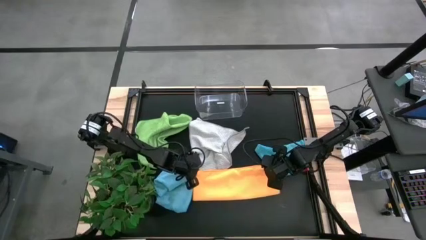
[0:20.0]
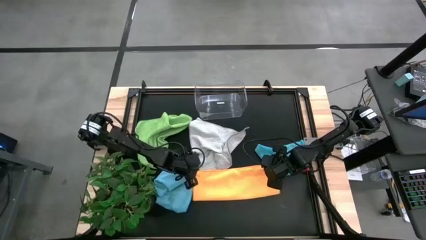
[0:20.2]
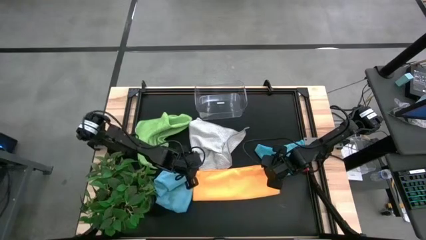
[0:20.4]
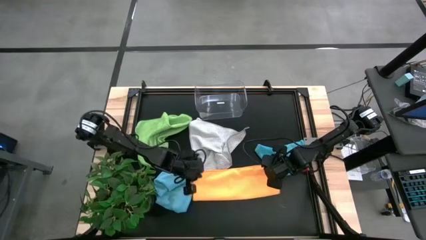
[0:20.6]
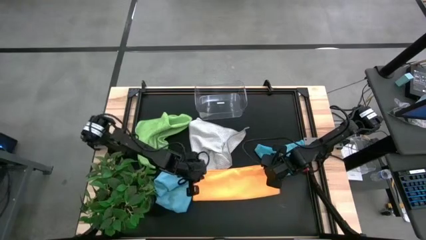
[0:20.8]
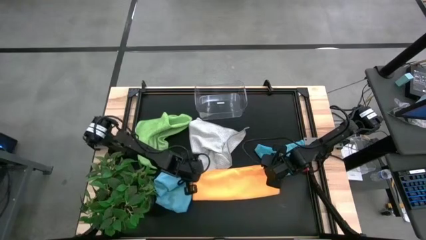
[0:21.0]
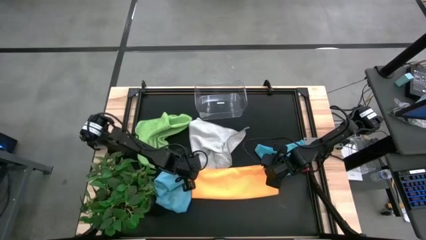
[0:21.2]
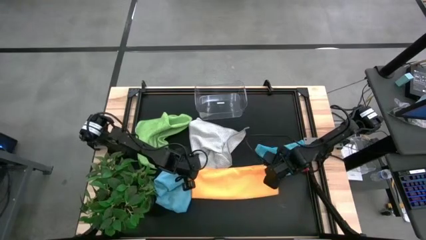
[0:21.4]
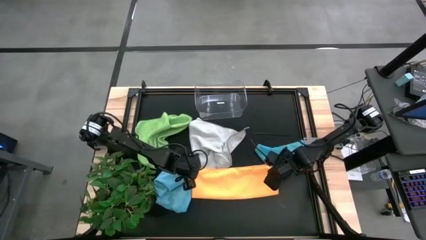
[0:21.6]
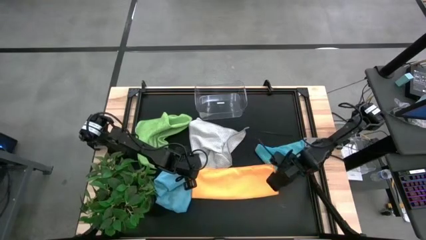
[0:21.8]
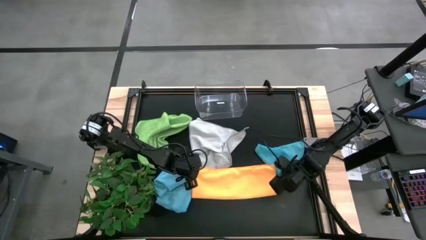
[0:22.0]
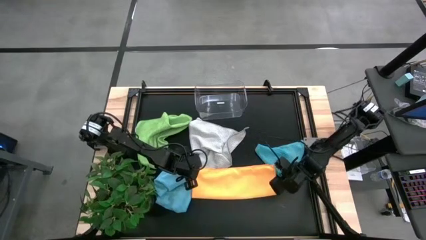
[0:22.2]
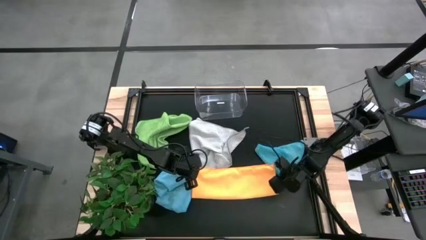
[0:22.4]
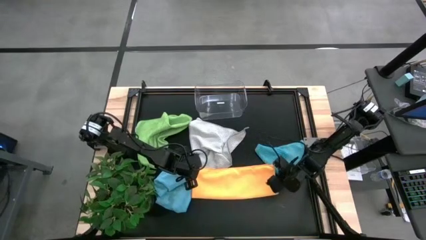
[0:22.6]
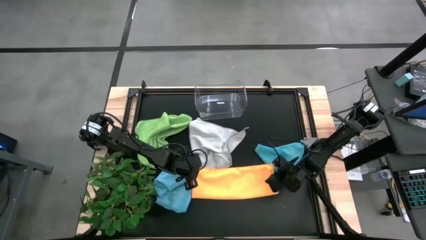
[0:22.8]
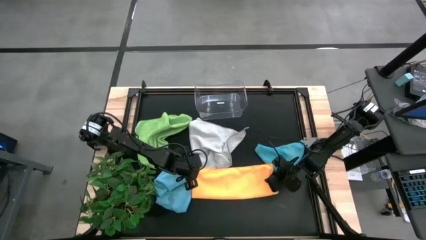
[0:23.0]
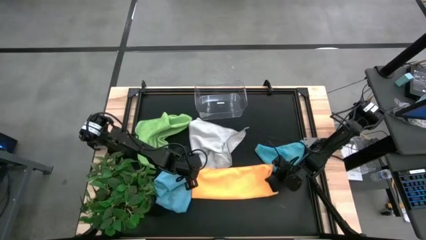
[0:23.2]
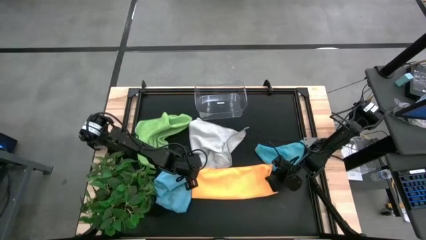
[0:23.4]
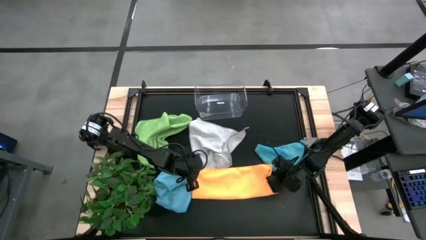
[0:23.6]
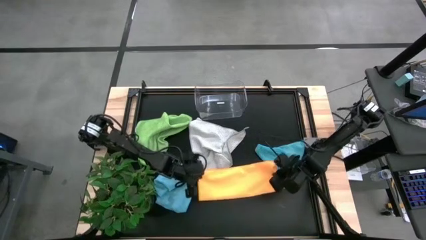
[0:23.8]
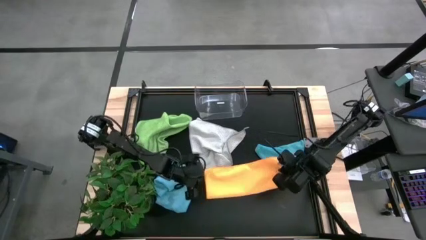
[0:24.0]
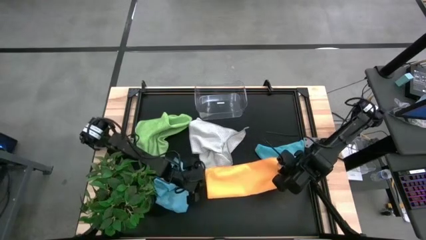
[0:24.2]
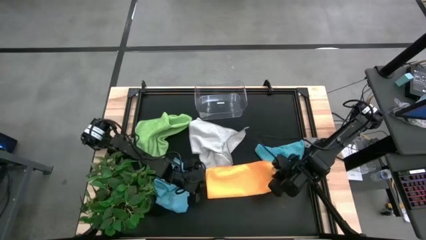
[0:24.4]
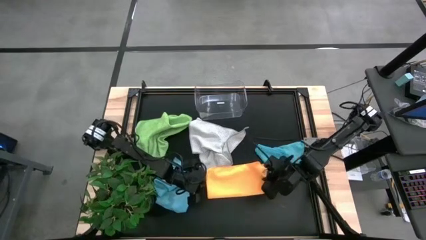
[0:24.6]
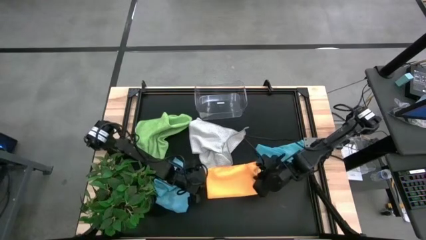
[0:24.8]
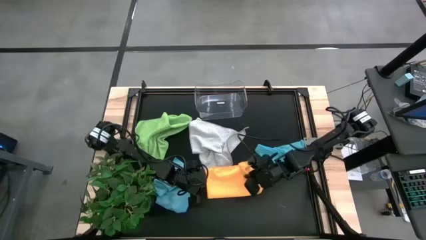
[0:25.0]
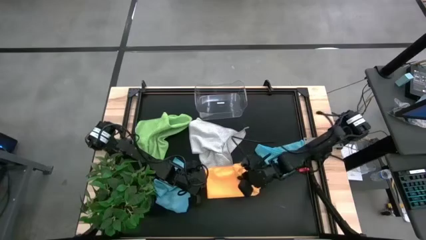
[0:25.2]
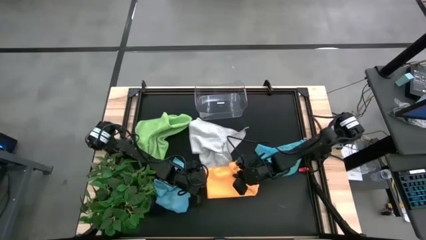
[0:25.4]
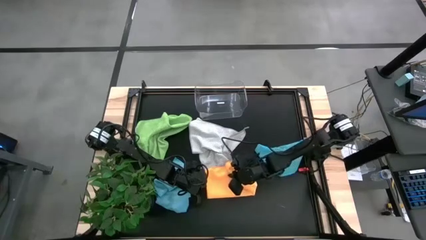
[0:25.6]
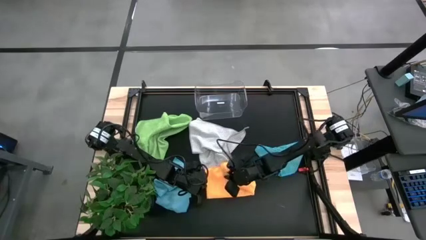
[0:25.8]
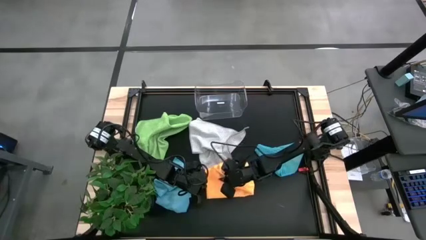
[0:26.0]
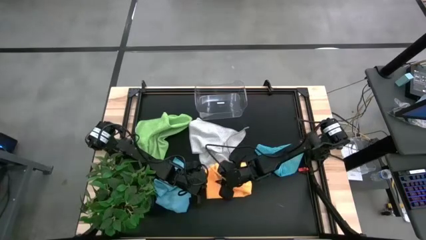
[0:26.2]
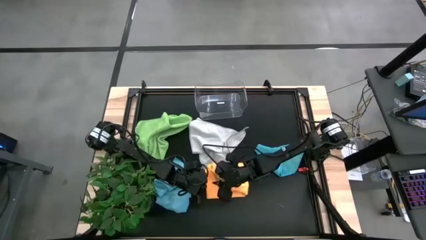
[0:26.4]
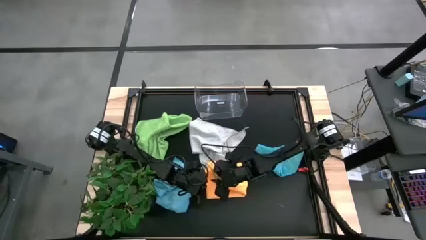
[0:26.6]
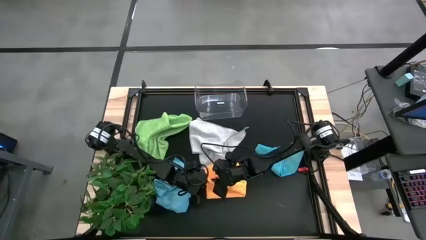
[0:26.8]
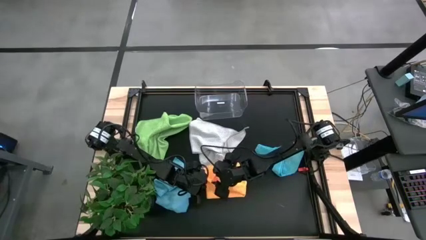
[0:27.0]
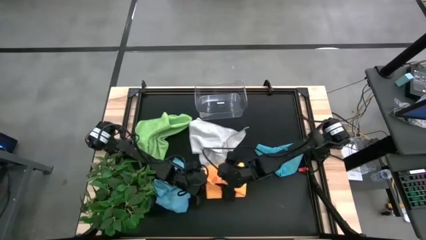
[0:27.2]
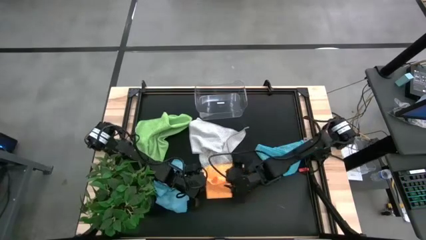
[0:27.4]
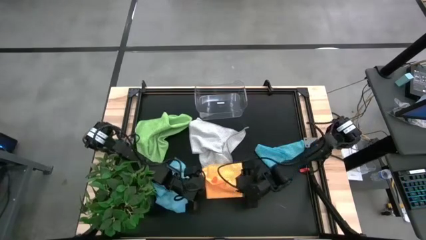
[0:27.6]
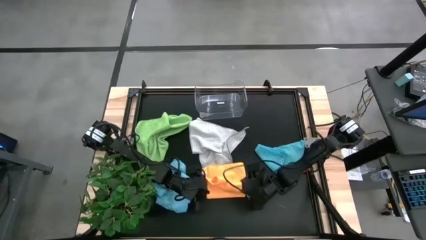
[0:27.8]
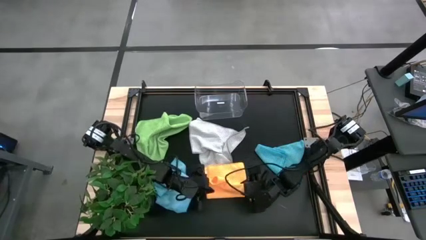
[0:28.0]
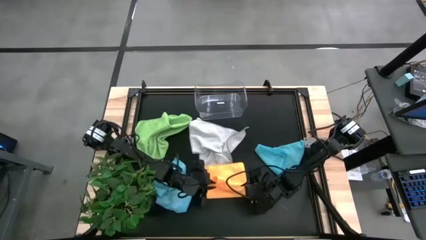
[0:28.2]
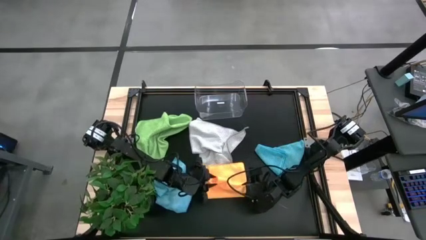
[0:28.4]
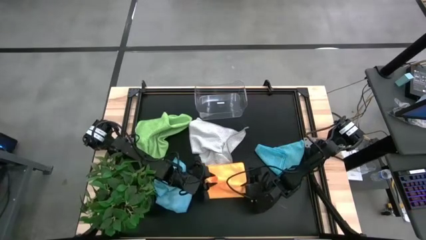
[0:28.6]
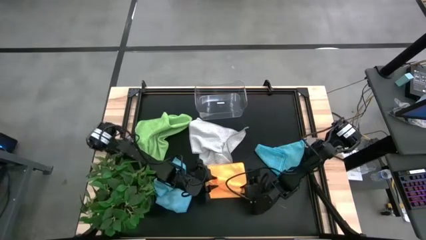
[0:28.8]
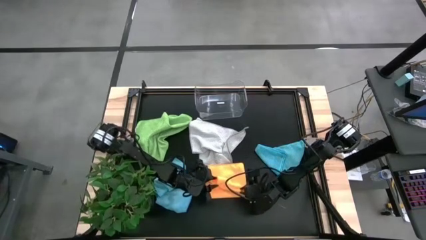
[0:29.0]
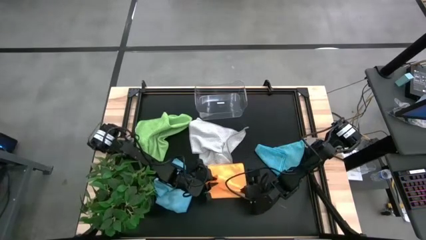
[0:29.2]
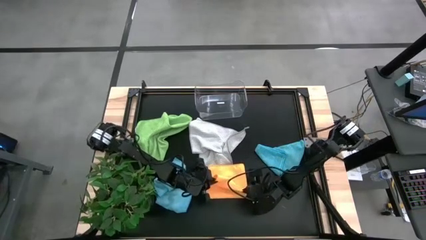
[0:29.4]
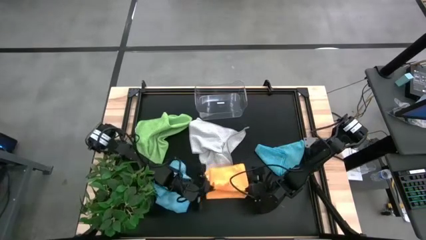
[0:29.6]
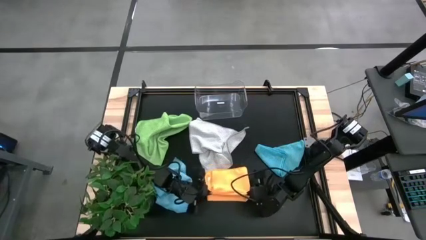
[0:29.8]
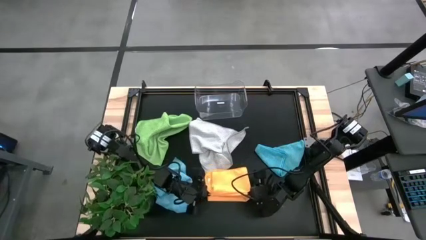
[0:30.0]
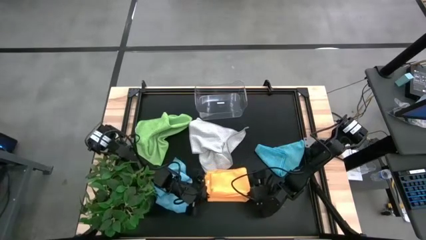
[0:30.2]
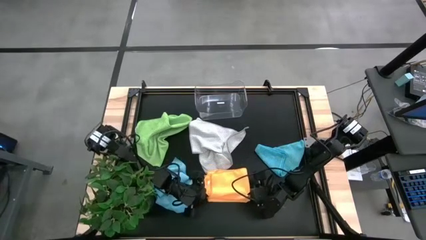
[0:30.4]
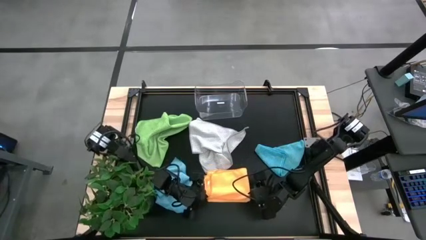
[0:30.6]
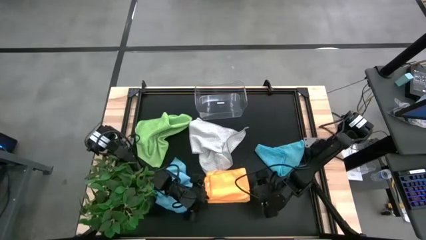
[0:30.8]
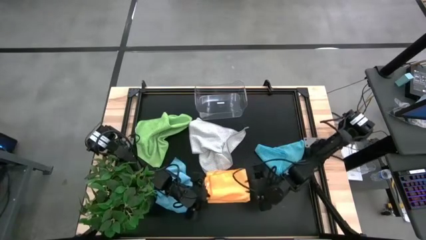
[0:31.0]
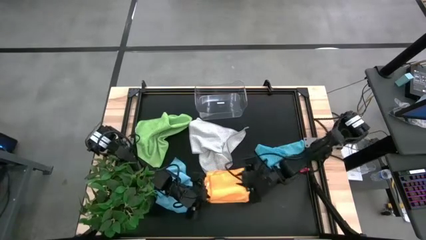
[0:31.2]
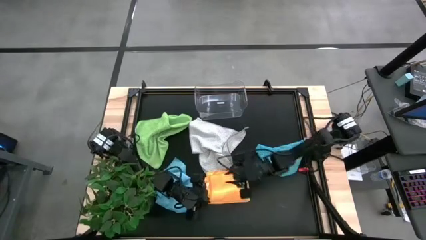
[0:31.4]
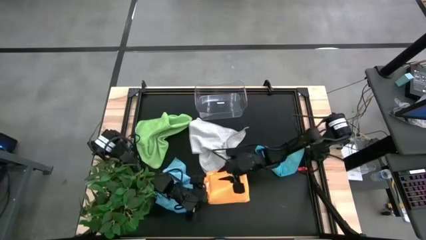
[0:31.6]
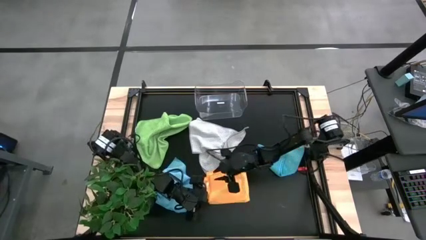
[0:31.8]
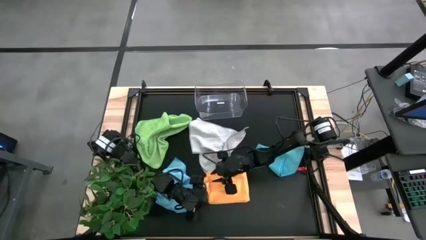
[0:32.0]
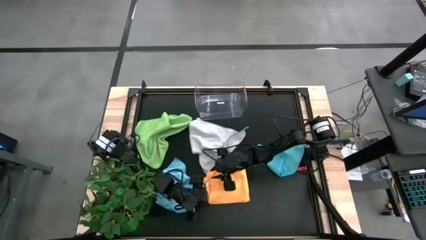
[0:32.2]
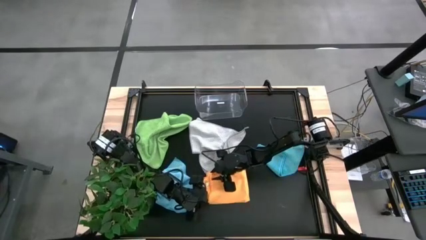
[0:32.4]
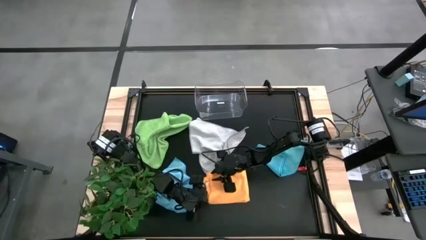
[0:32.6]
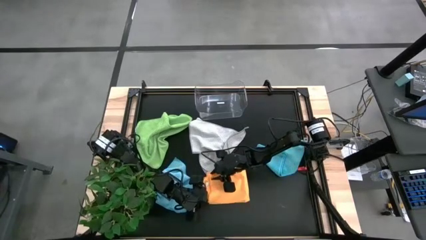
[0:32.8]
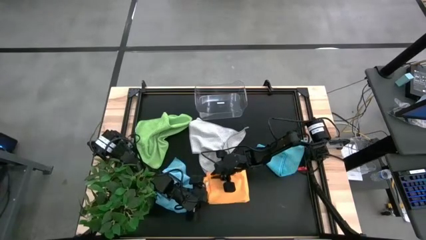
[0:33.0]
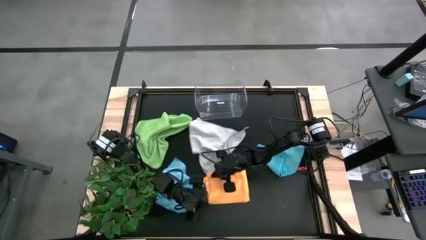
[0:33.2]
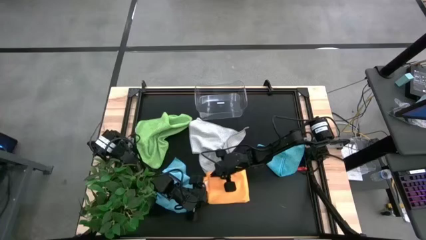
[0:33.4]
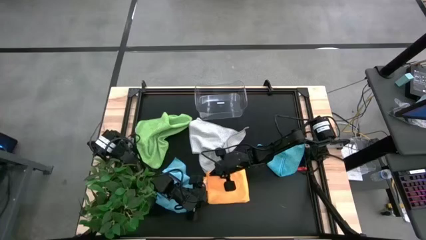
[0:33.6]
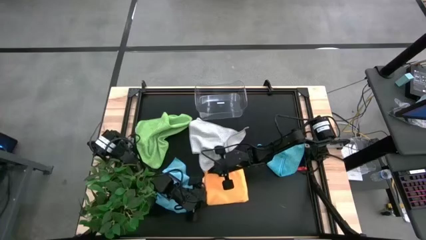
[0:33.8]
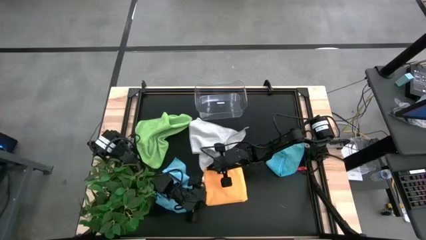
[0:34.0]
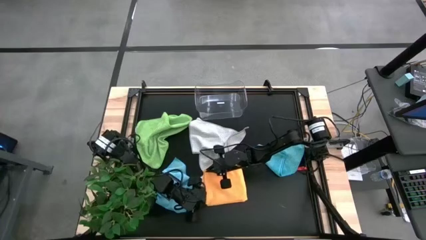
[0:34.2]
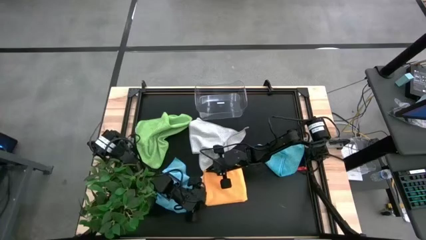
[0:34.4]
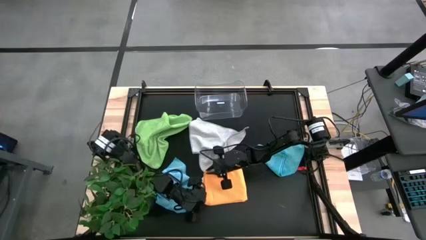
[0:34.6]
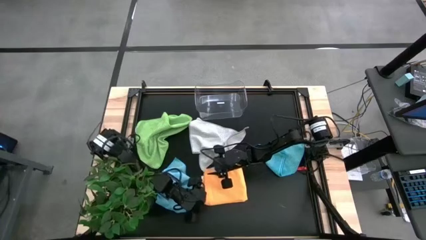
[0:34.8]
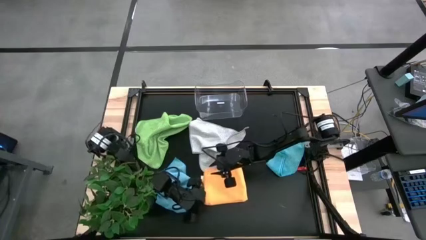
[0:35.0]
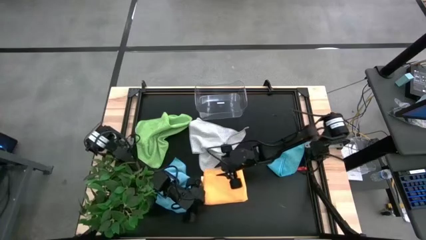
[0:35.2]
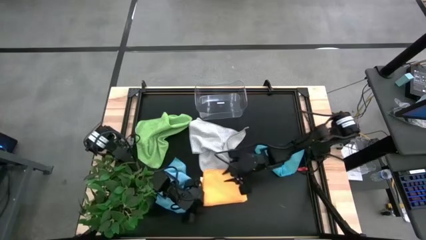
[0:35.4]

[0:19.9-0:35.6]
Task: Fold microfiber towels
Fold the orange microfiber cloth

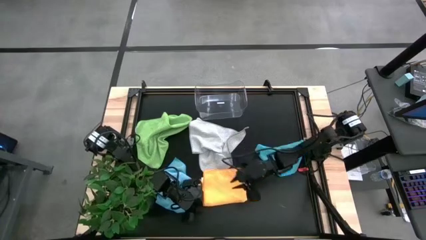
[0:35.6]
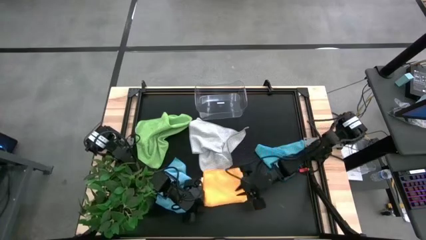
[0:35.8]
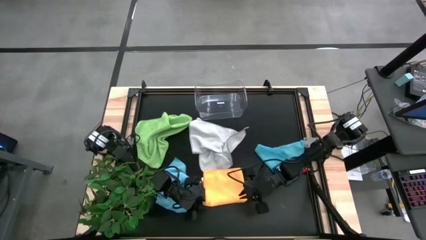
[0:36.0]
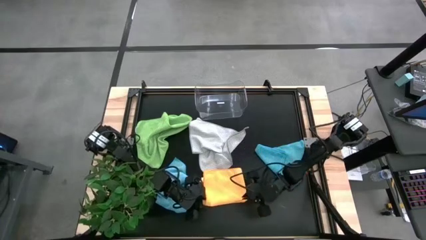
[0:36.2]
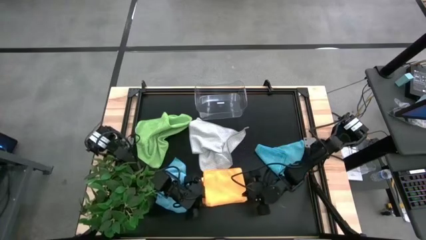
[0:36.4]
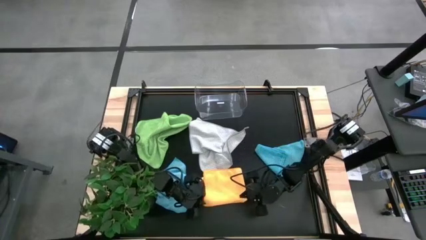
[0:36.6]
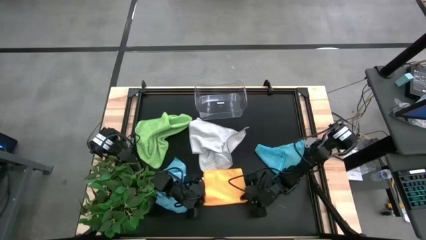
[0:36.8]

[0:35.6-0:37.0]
Fold the orange microfiber cloth

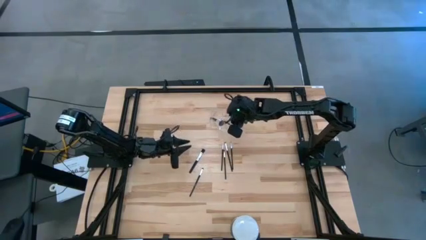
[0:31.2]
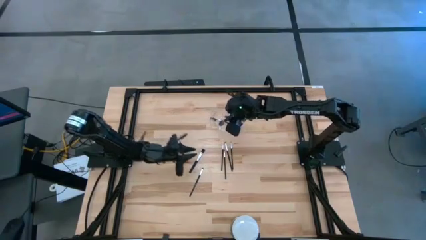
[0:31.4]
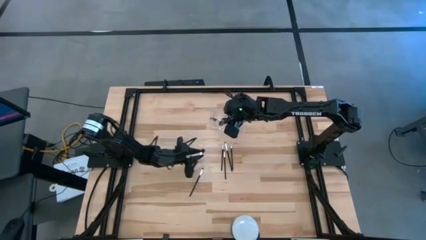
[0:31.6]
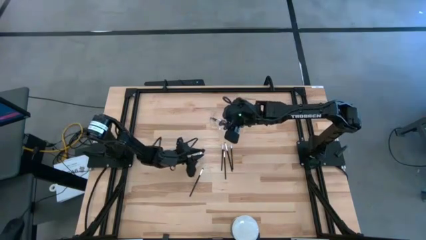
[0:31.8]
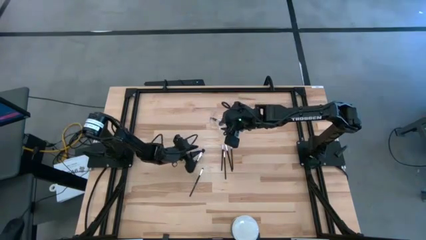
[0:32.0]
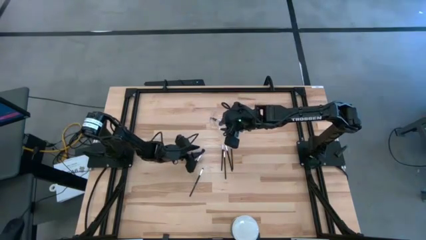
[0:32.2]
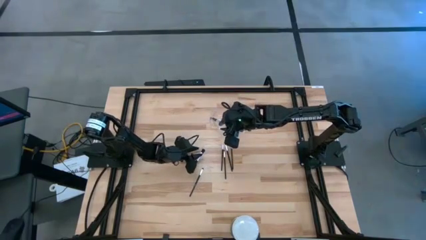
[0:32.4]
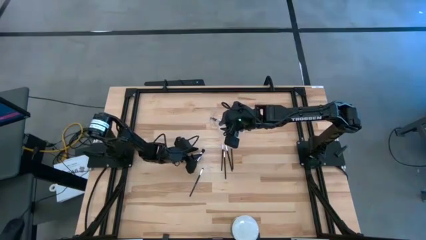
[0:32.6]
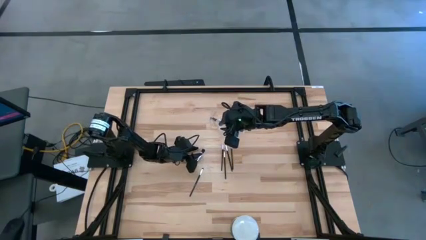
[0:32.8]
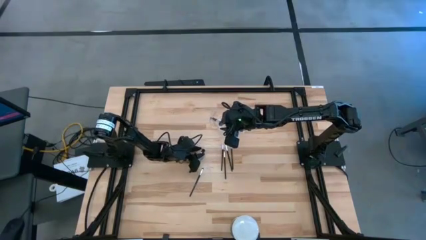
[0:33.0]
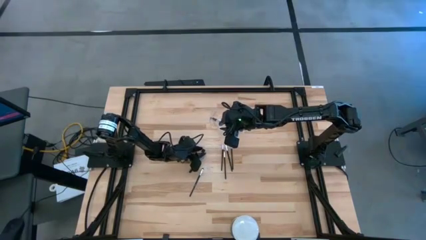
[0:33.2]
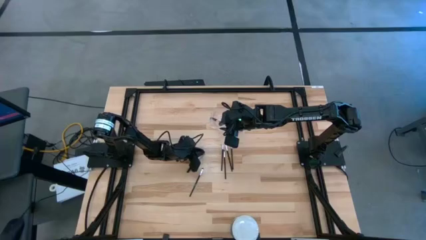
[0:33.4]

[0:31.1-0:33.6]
Task: Put items in baskets/containers
Put the black blush brush into the transparent organizer
